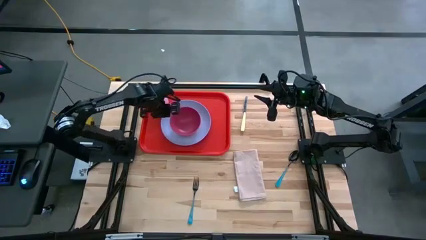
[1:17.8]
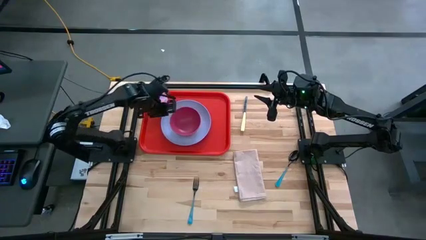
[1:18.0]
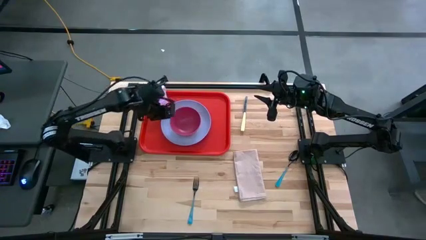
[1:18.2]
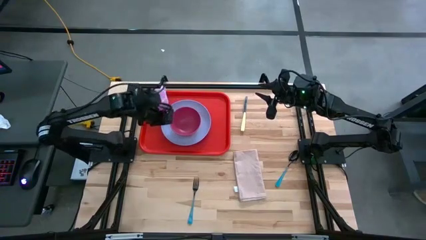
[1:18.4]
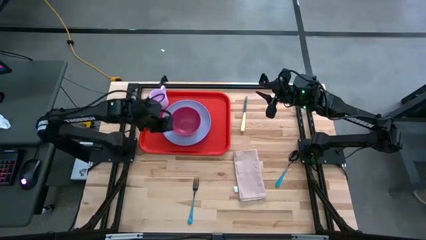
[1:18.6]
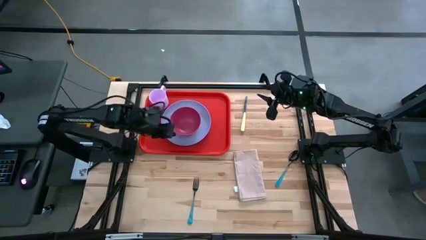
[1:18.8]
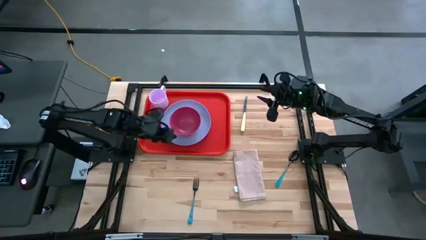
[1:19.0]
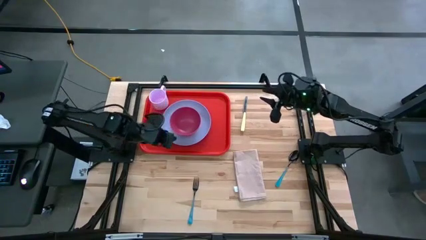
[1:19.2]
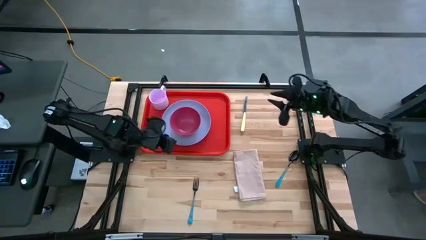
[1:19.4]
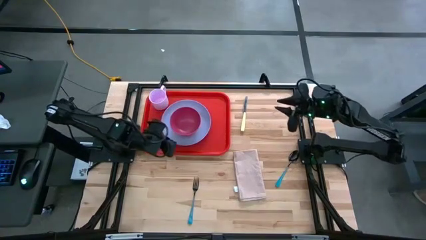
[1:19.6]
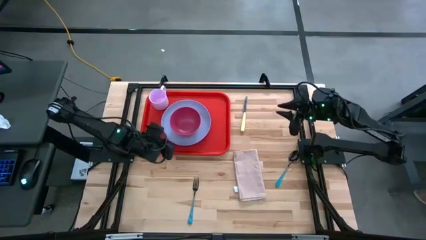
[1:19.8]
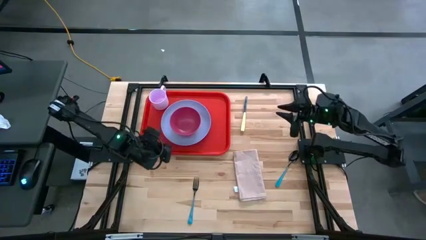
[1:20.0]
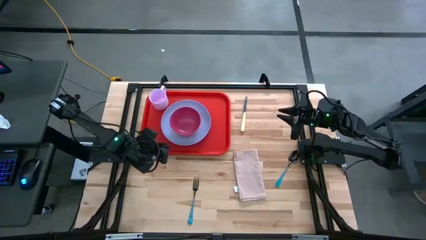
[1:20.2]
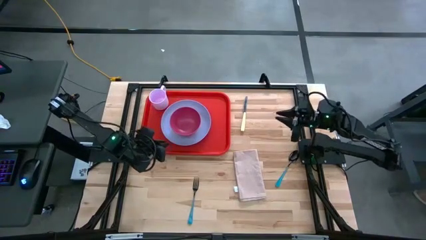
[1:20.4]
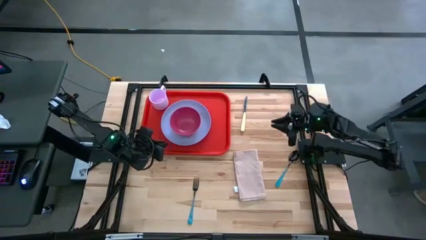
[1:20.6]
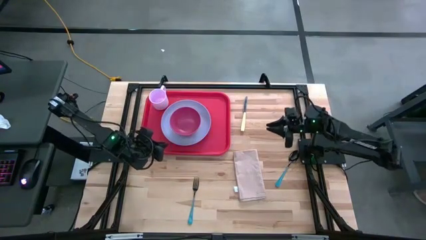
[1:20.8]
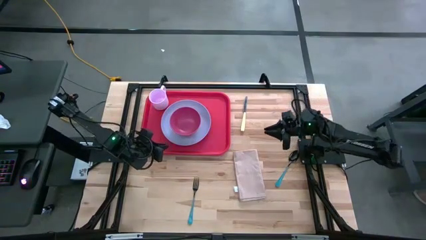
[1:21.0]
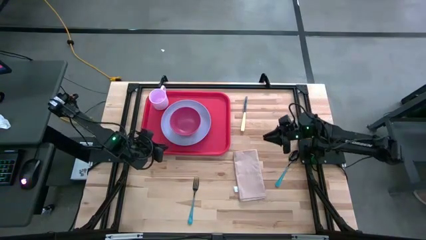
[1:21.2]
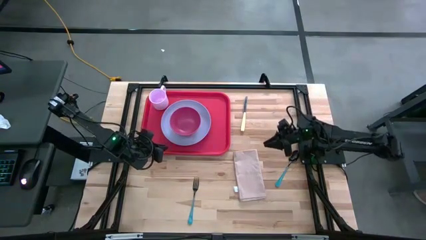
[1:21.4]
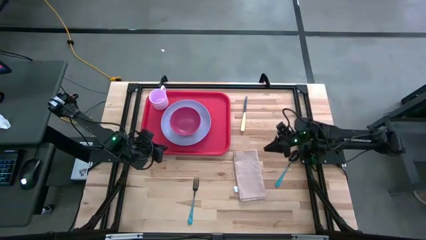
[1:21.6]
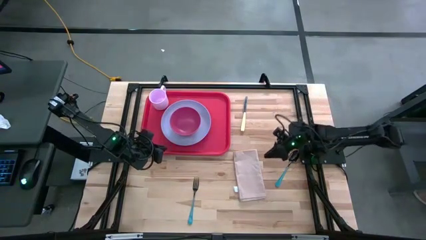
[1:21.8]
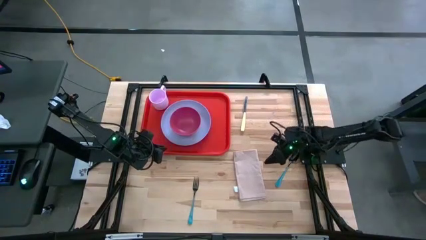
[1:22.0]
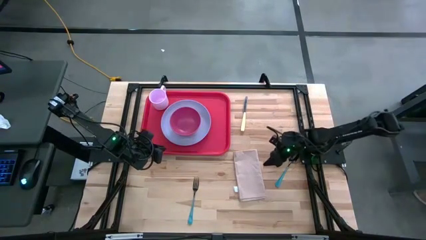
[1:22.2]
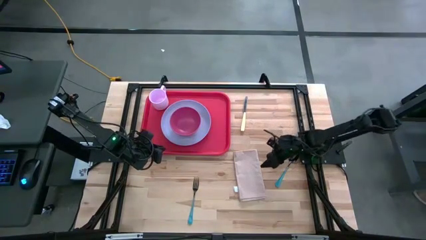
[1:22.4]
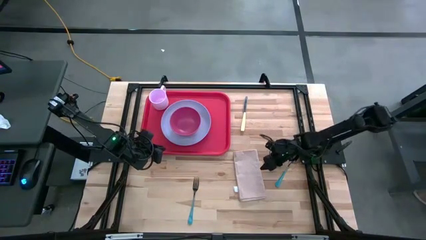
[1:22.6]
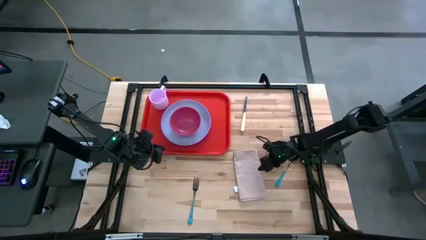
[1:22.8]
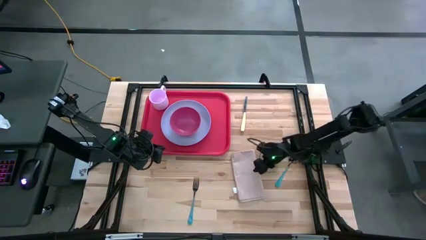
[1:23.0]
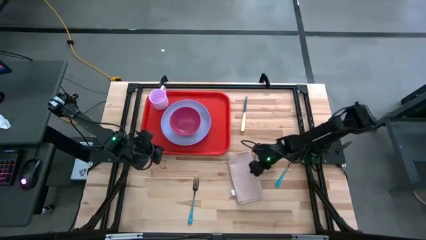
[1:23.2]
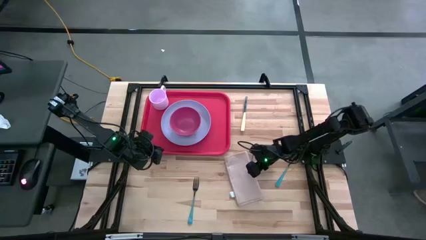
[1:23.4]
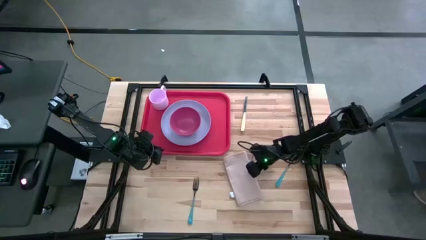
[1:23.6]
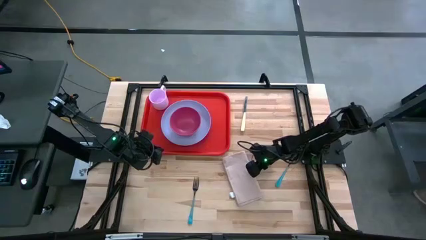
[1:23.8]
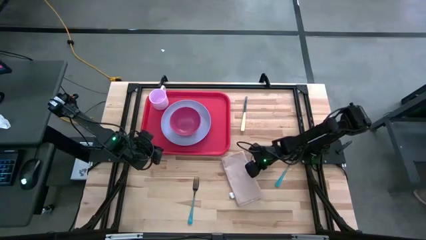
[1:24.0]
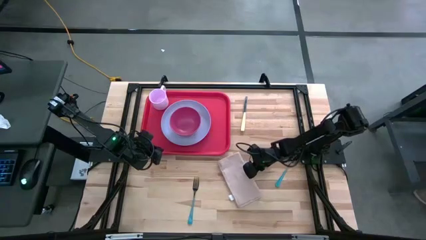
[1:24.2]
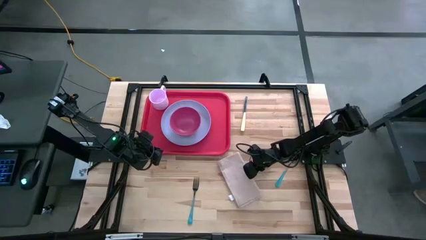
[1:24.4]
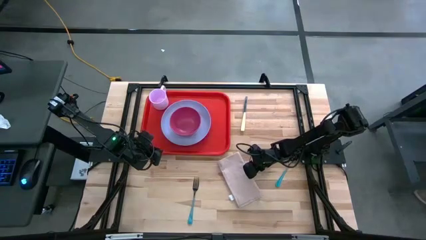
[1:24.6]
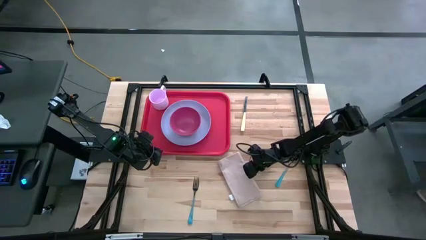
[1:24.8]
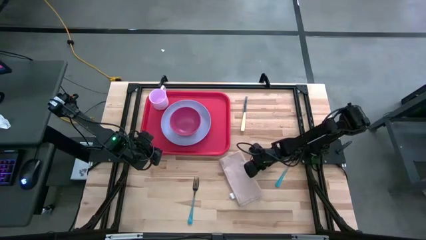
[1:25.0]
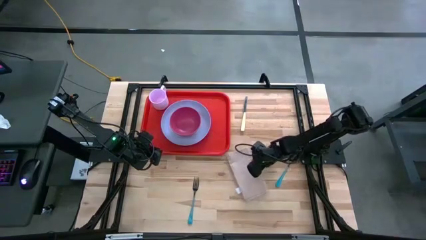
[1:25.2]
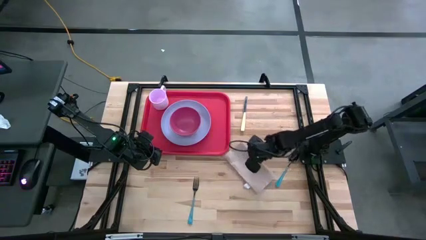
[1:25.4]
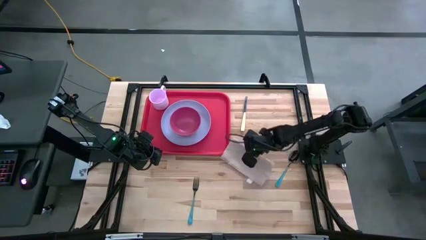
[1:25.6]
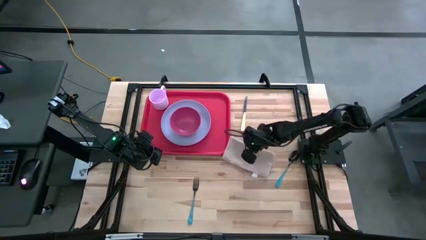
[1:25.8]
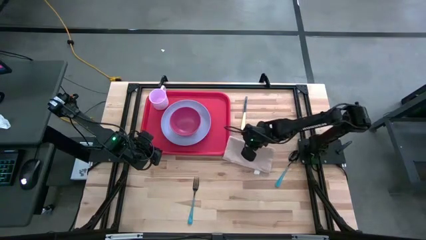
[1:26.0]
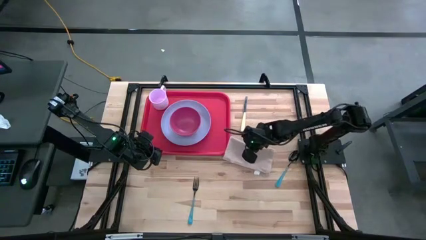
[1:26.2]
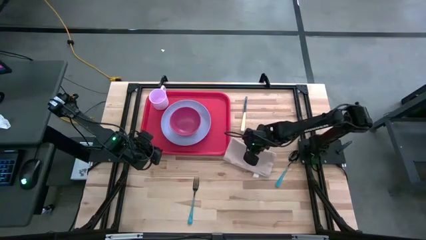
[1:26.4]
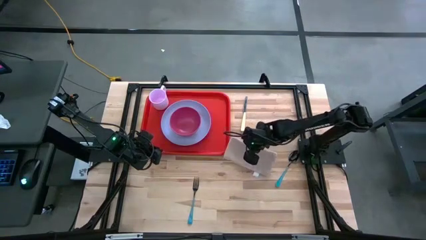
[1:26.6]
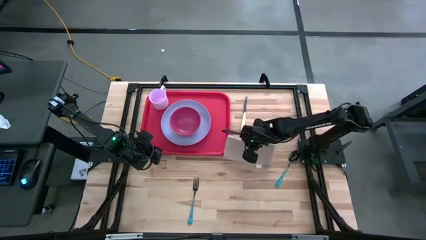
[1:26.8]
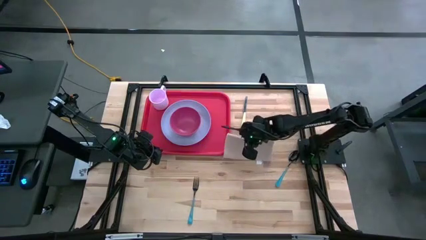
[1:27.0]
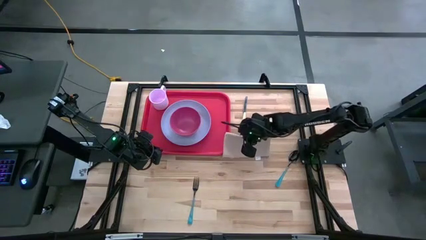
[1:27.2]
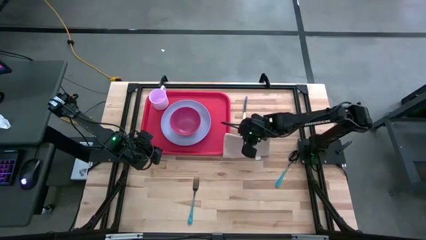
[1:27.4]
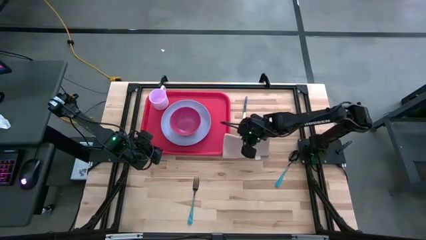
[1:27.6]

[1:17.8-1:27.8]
Task: Set up tray
Put the brown napkin on the red tray to the right of the purple plate

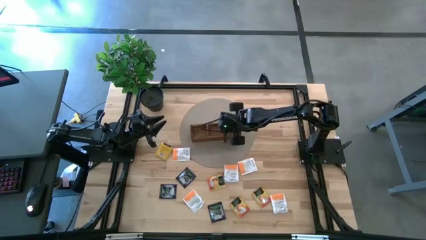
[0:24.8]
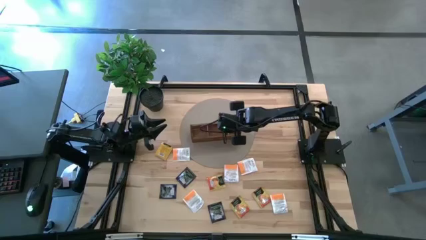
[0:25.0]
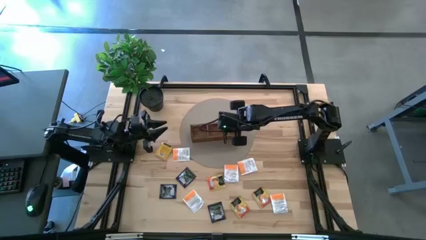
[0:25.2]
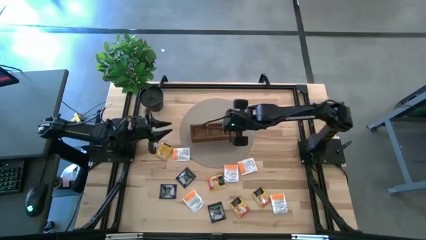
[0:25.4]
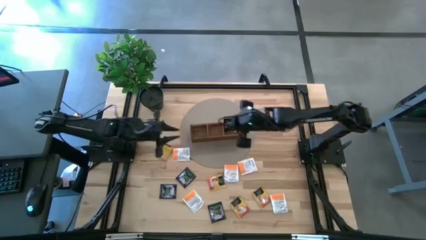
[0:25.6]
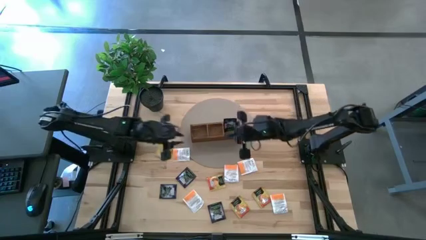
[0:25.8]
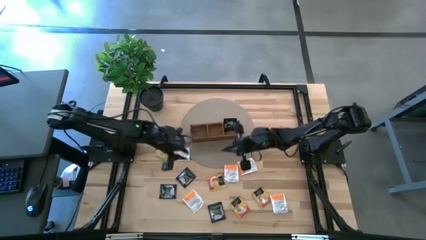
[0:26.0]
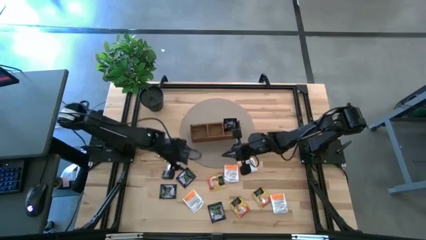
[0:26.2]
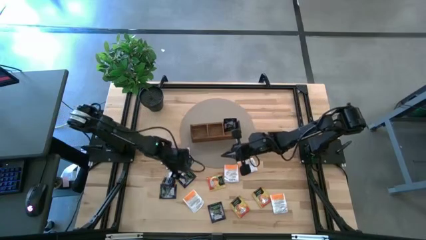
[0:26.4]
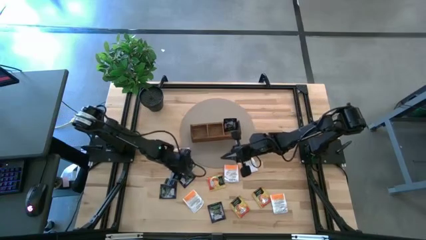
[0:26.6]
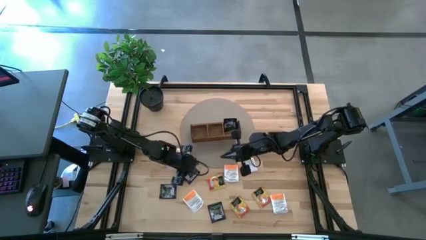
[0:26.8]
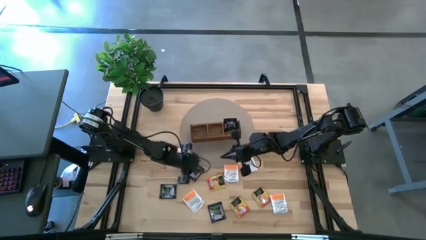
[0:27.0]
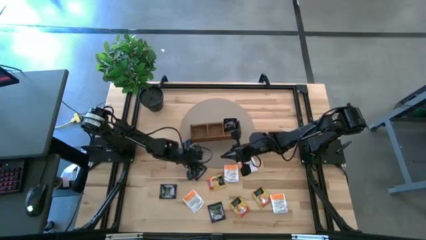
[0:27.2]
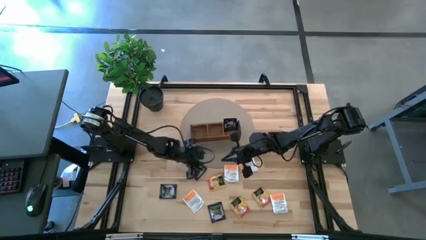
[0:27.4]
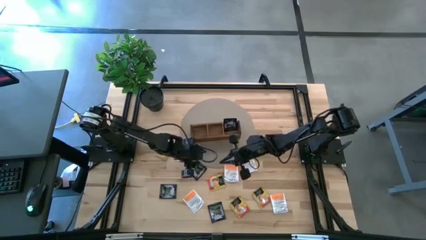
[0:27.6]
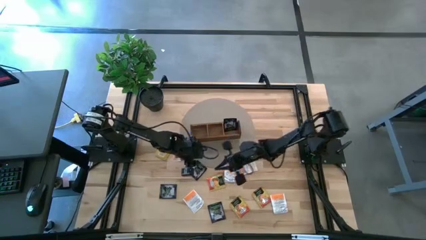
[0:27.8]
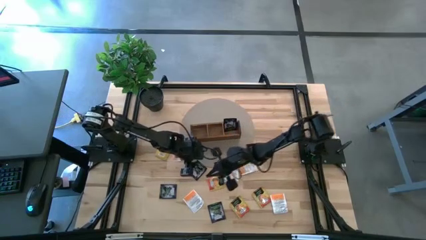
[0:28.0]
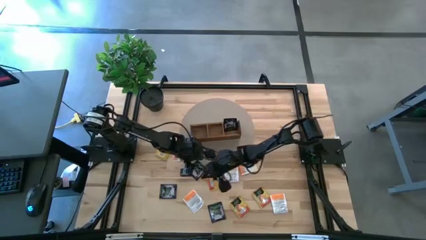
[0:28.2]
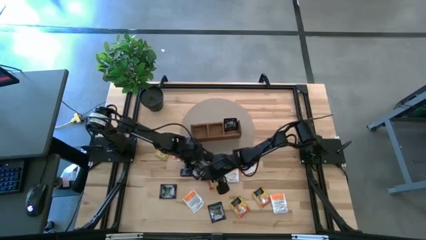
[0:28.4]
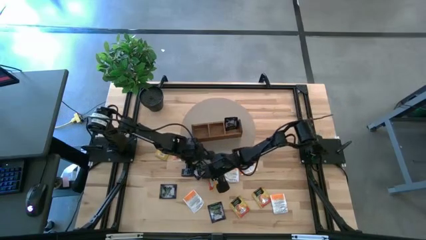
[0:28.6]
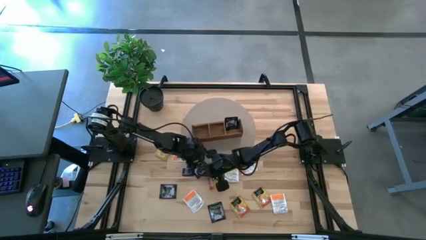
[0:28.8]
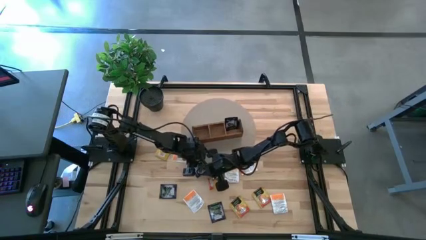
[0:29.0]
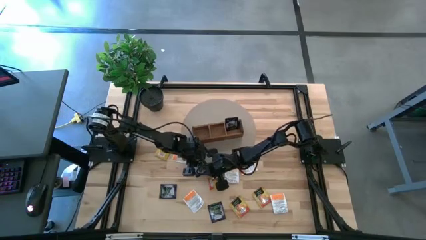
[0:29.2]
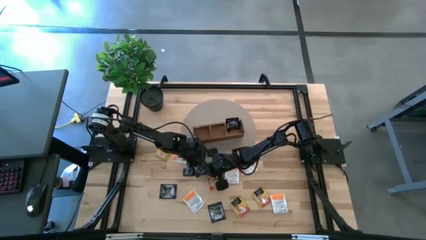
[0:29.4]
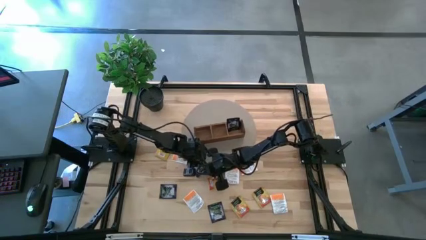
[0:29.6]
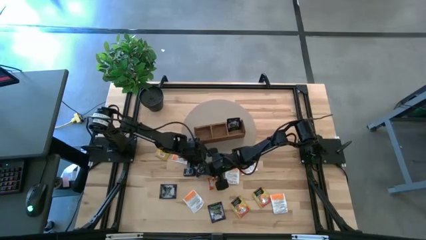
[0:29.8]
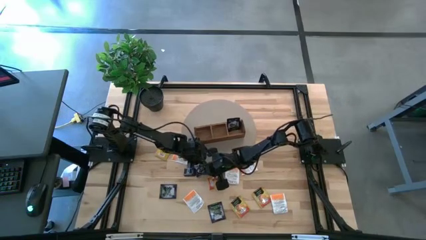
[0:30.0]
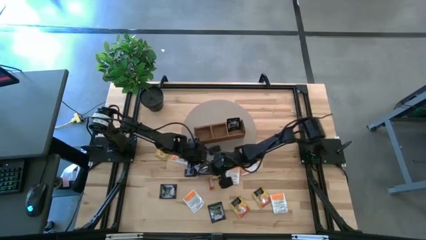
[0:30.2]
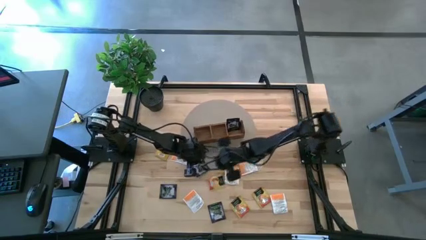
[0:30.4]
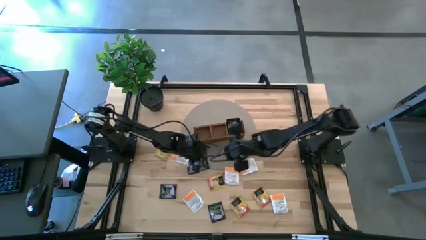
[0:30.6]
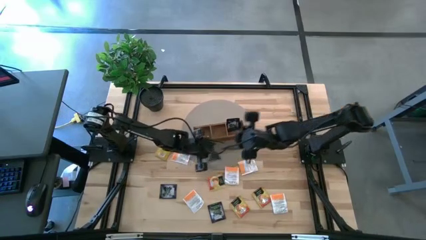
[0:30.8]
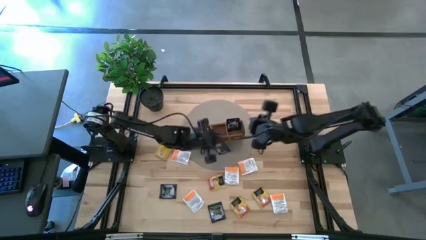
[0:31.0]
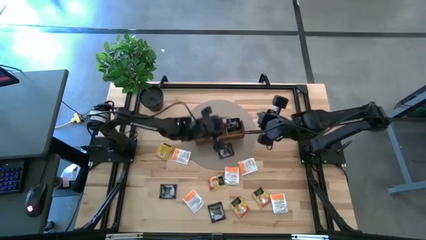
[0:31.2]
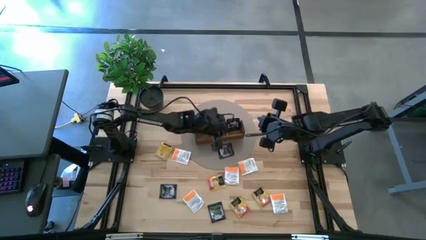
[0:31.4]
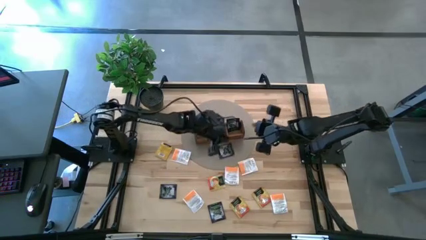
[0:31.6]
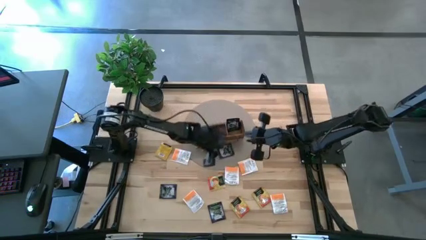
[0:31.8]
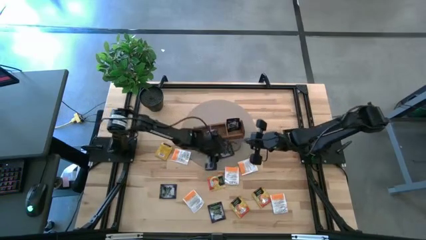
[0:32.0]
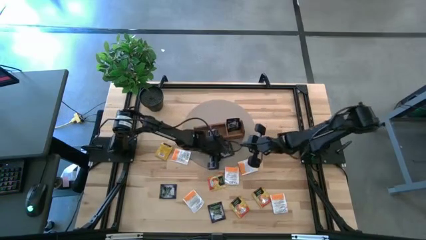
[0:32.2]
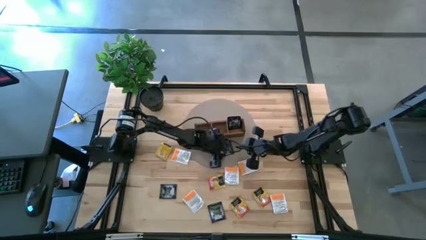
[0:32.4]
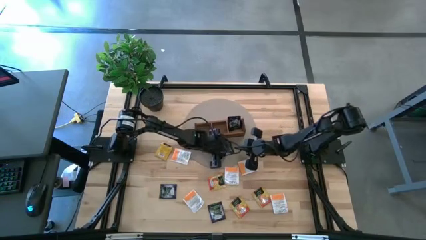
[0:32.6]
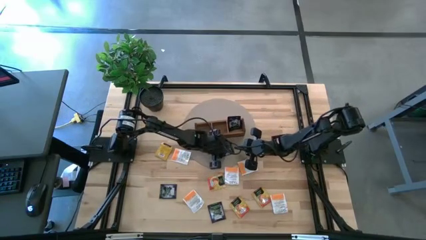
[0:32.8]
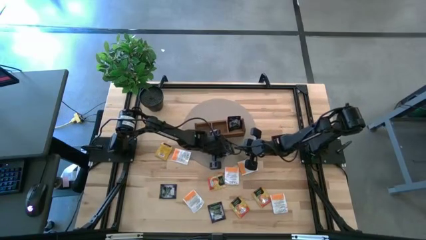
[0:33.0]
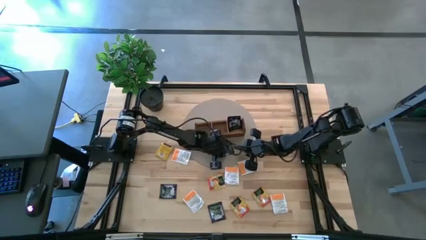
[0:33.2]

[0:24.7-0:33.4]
Task: Pick & Place Tea
Put the purple tea bag into the right section of the wooden organizer
